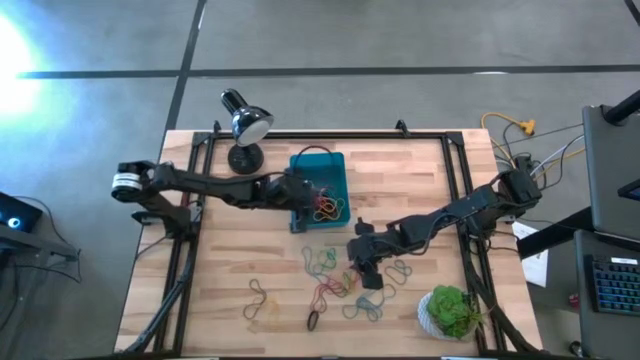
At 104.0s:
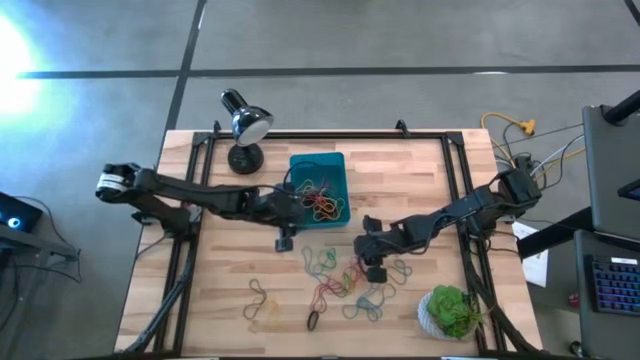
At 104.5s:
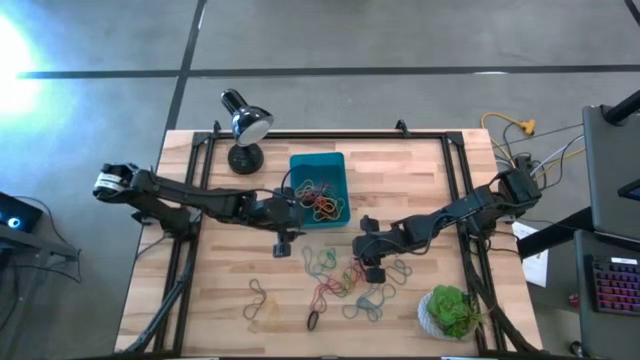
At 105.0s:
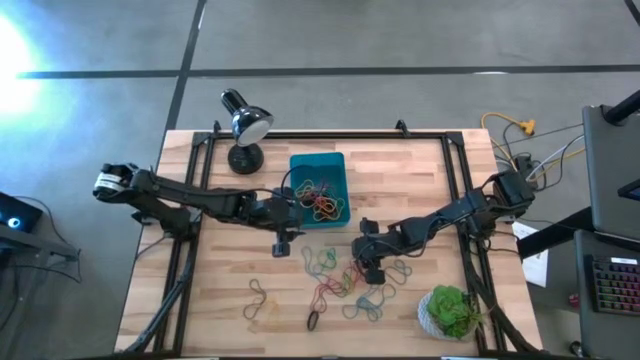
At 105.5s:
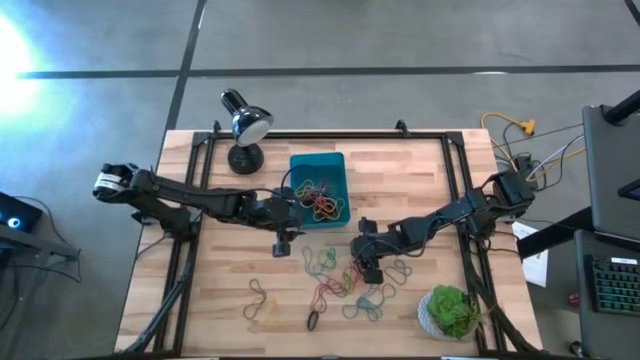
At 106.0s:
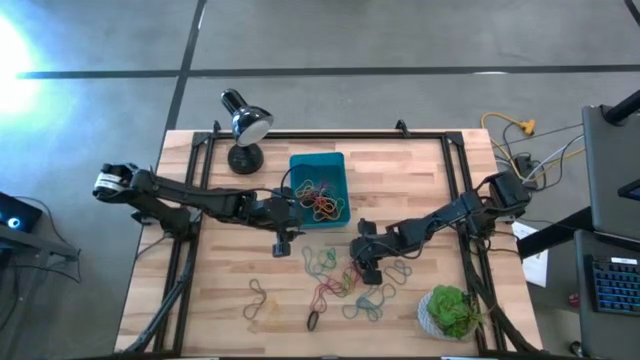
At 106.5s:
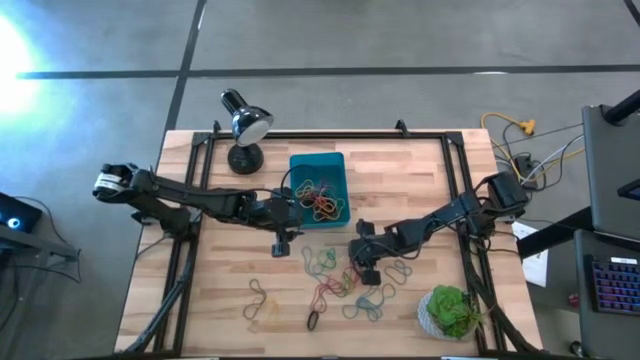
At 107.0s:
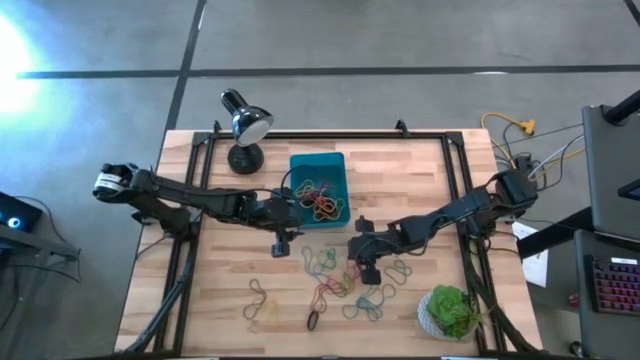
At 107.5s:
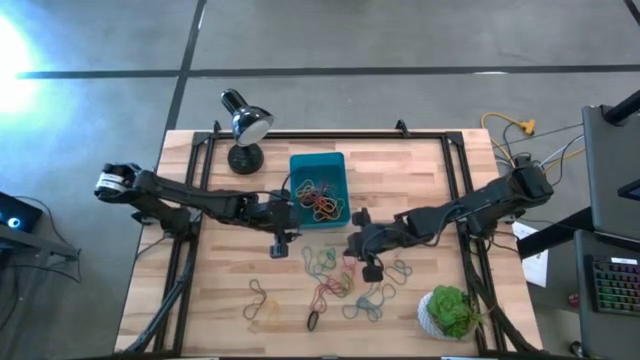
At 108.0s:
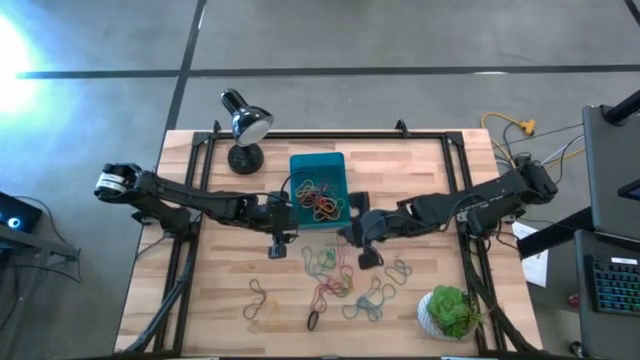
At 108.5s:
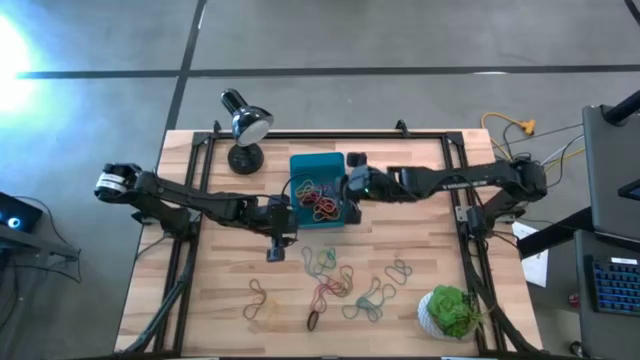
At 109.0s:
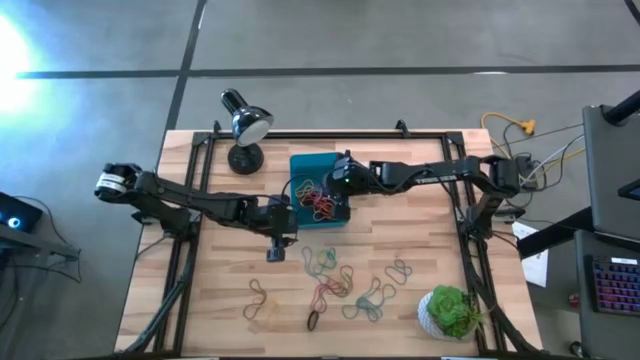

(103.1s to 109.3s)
Task: Pick and place rubber bands into bin
Put the red rubber band into the blue bin

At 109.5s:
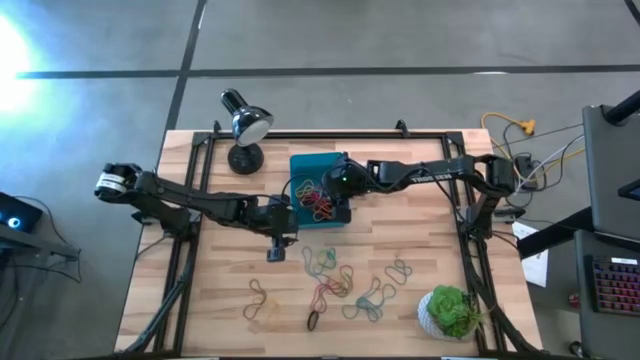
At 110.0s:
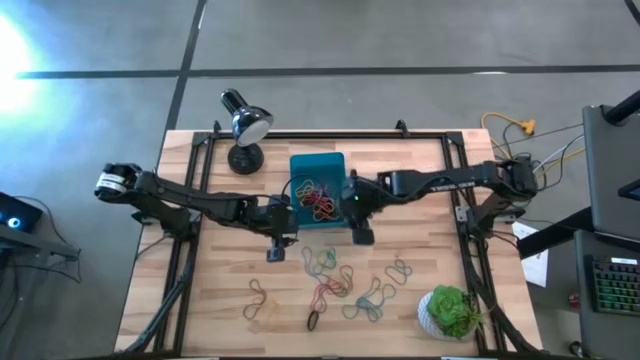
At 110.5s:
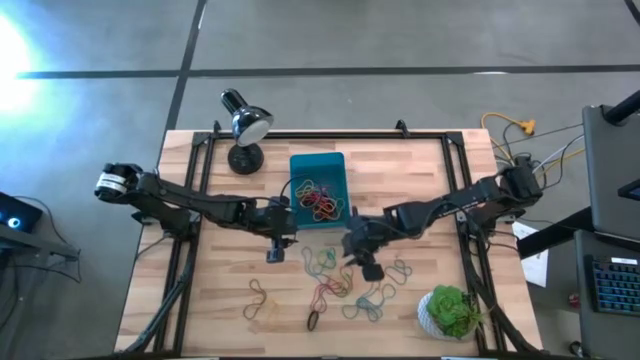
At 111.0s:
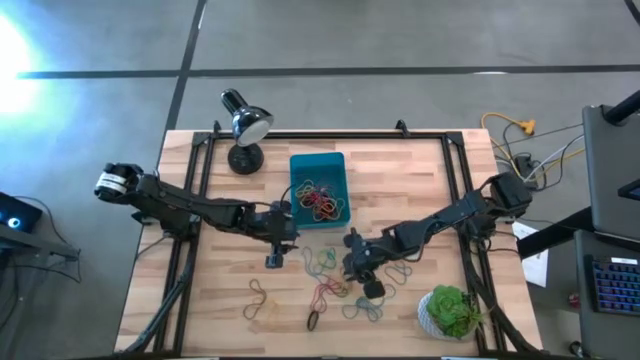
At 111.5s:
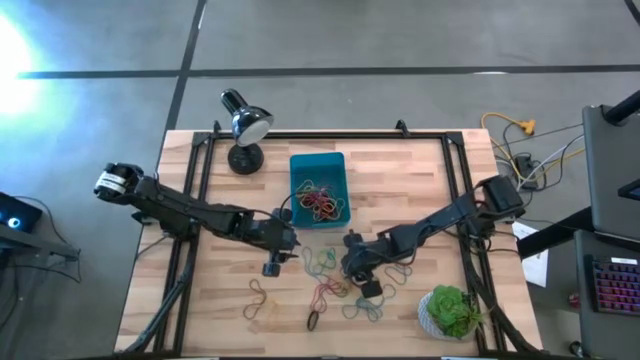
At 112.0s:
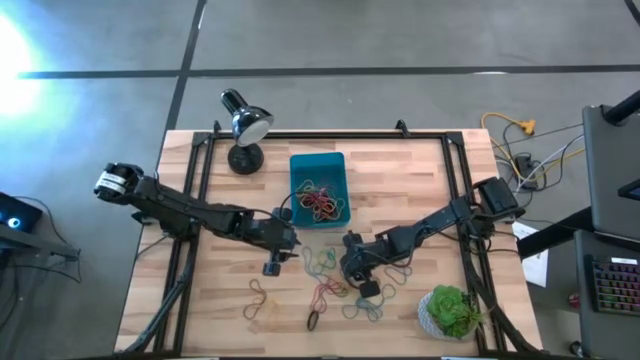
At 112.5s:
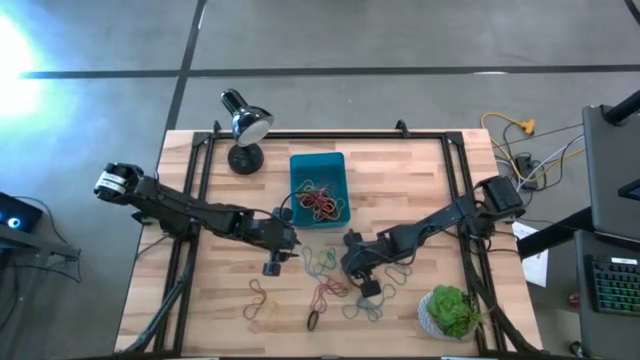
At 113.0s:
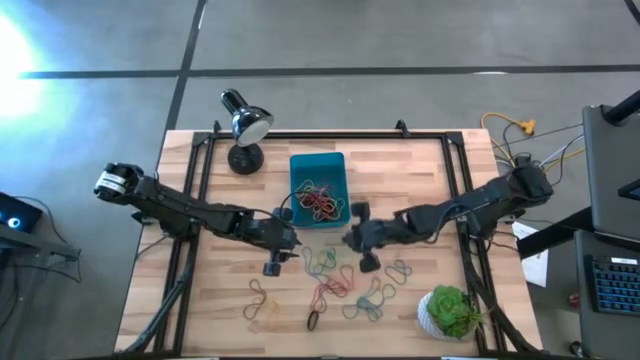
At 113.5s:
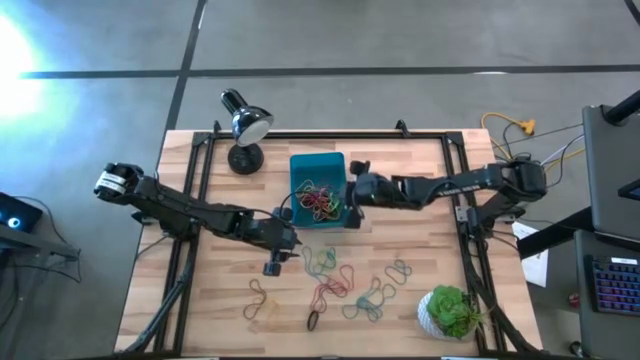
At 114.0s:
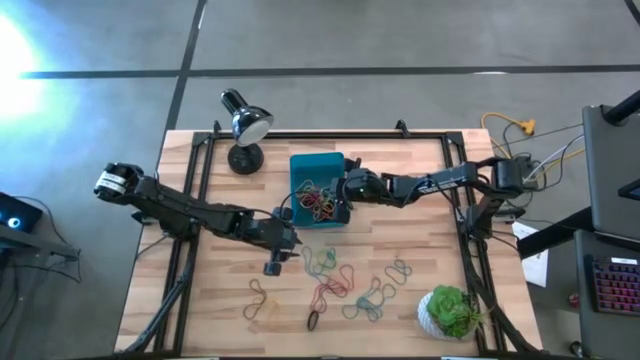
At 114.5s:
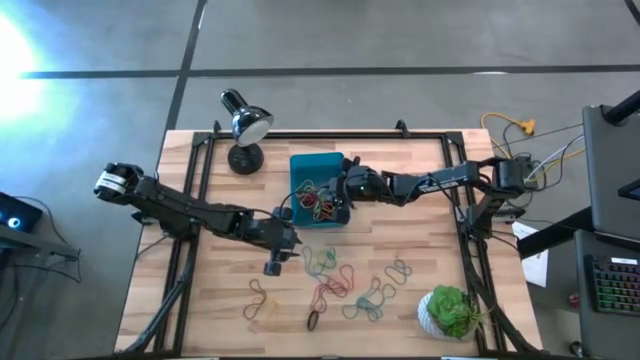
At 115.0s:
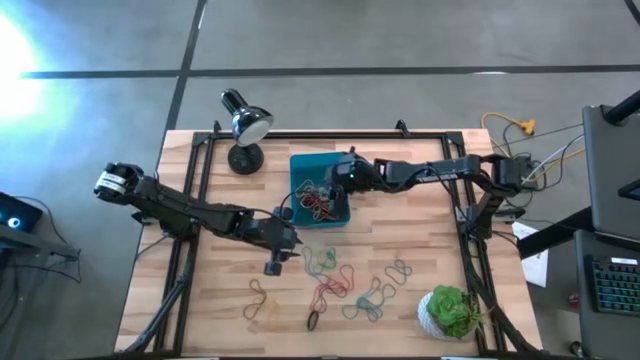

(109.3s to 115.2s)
Put the green rubber band into the blue bin

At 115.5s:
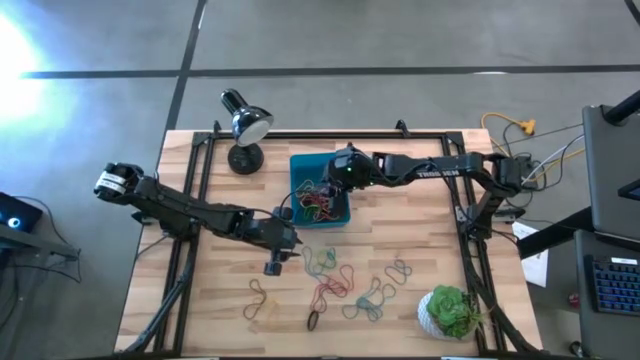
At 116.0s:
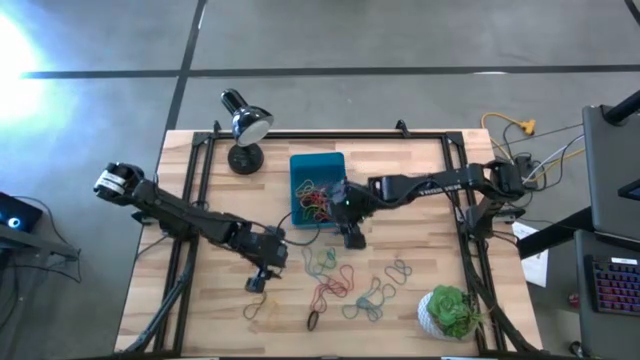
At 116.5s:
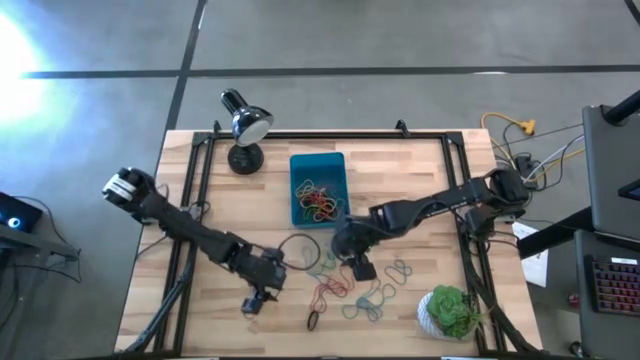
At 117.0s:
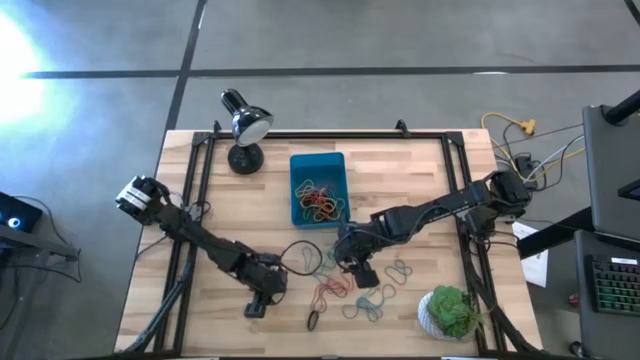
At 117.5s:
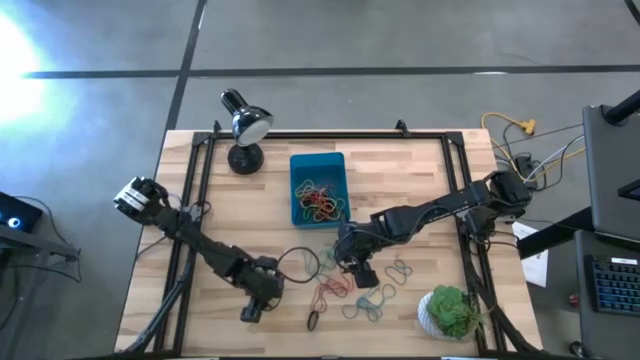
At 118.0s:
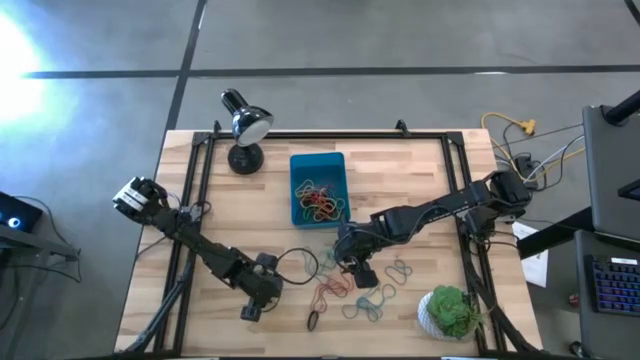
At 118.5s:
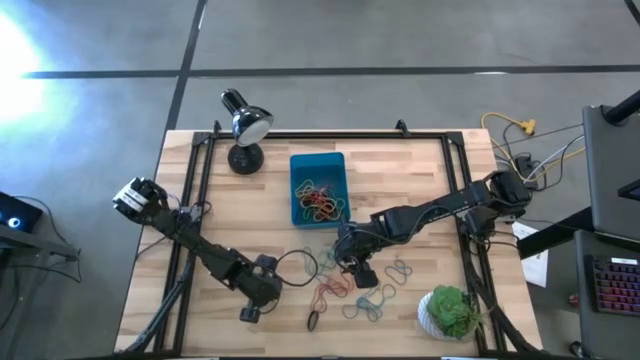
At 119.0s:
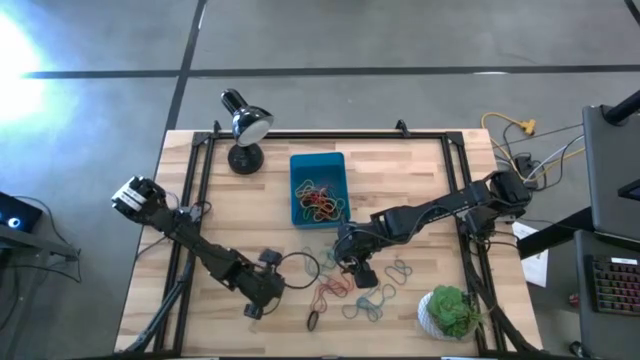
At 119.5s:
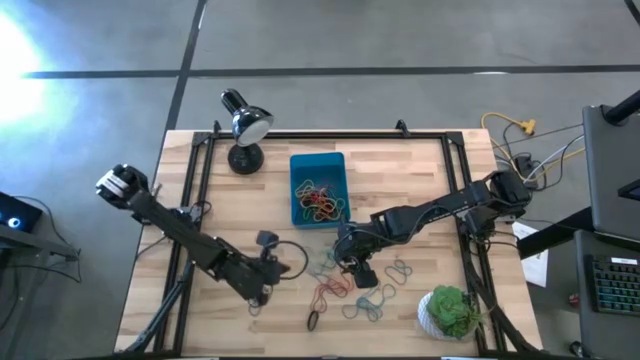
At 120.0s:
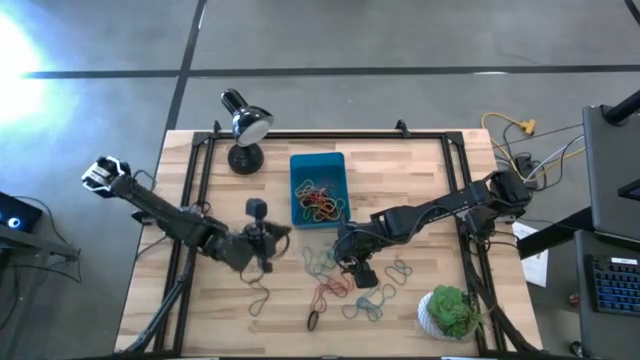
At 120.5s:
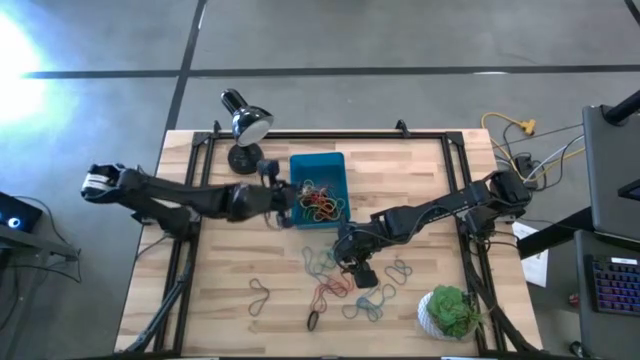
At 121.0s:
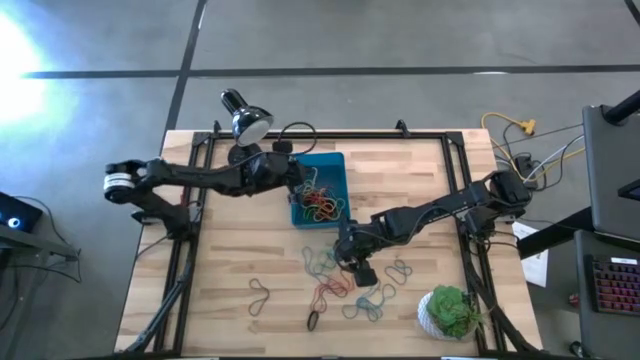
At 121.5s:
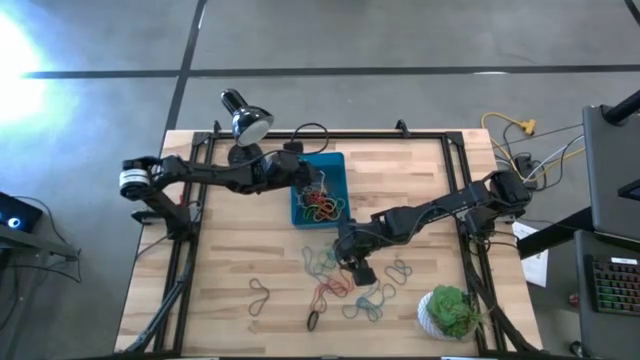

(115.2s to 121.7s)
Put the yellow rubber band into the blue bin

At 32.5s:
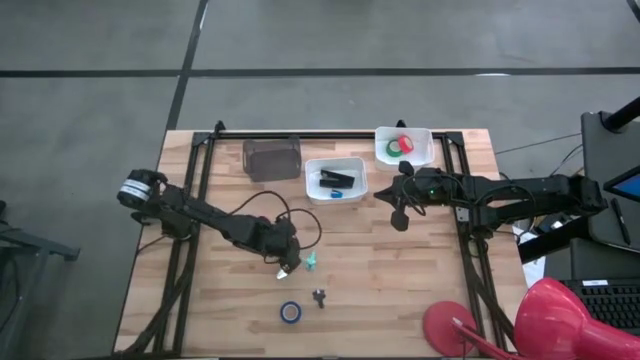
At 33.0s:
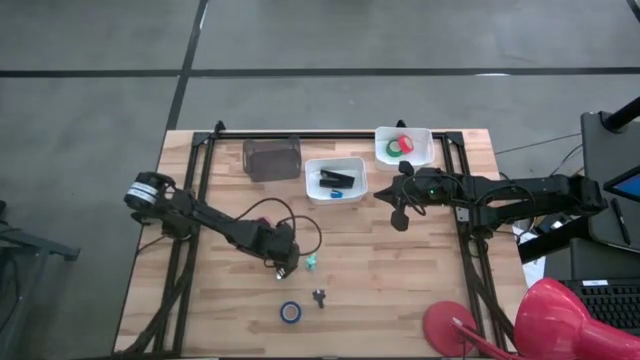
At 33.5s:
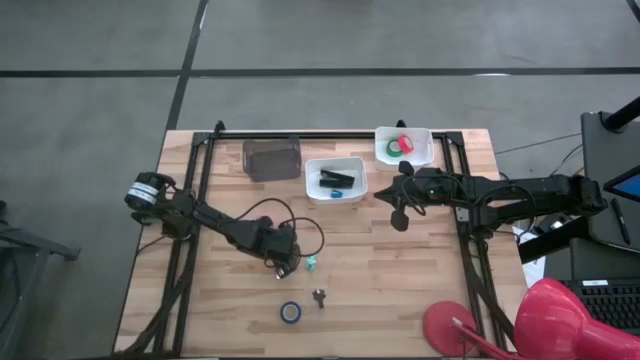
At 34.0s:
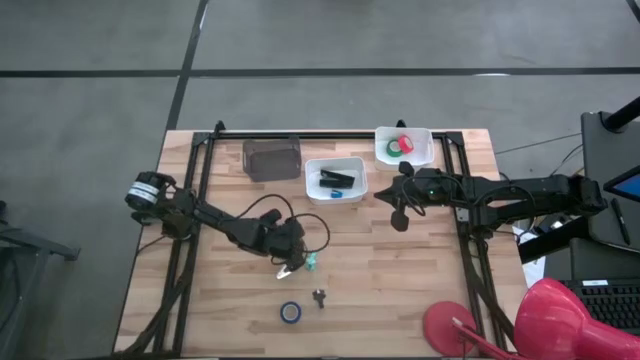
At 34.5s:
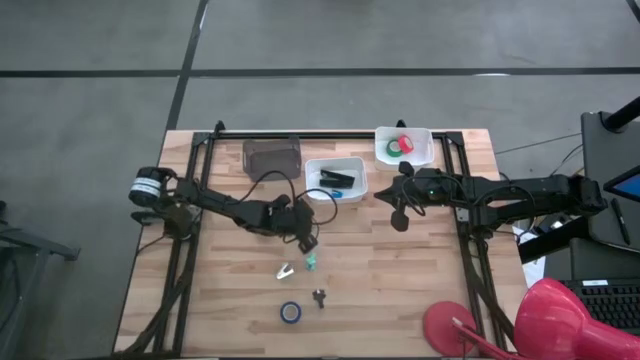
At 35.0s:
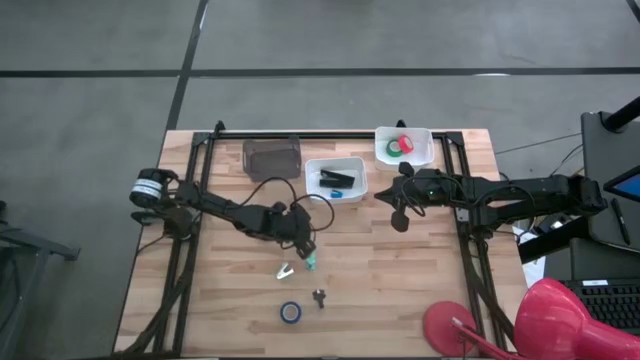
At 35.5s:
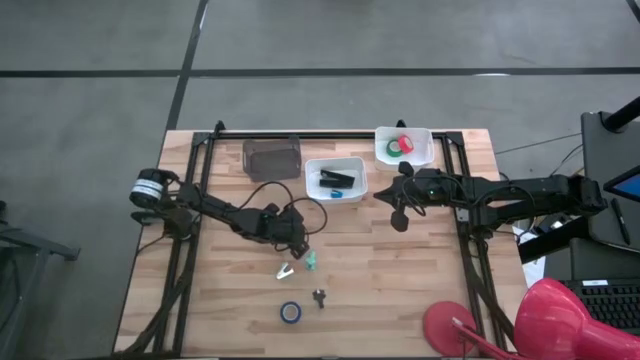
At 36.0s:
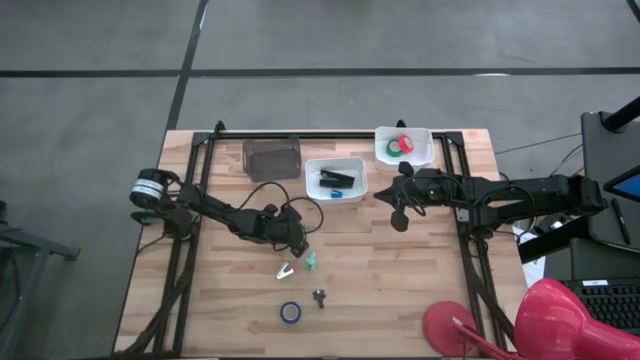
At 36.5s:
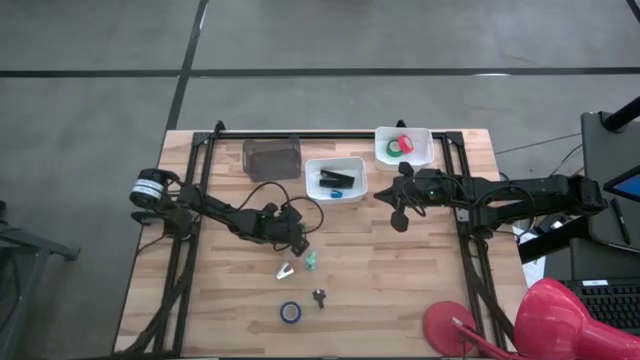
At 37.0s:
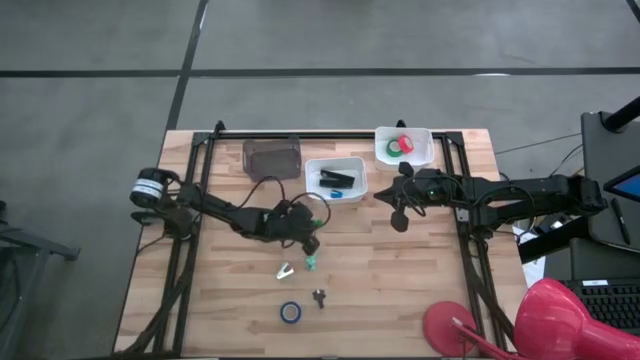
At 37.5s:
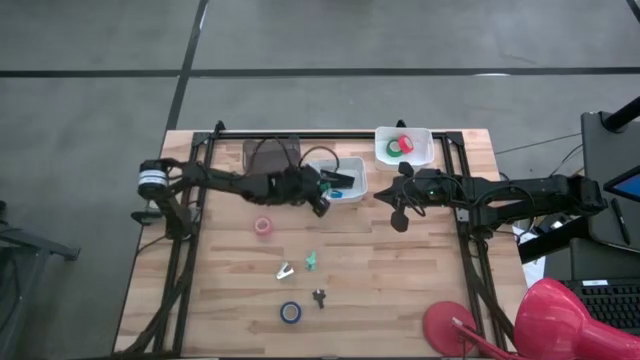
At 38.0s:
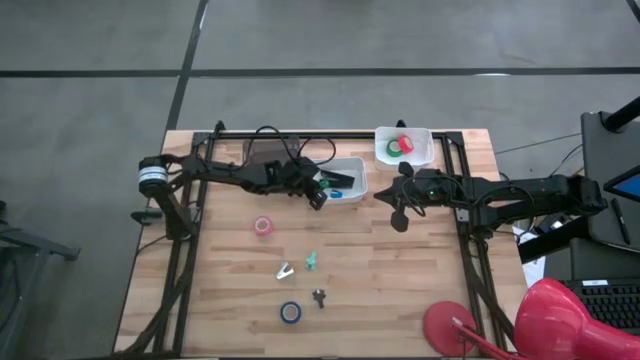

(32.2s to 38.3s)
Task: Pick and place Stapler, Stapler remover, tape
Put the green stapler into the left white bin
